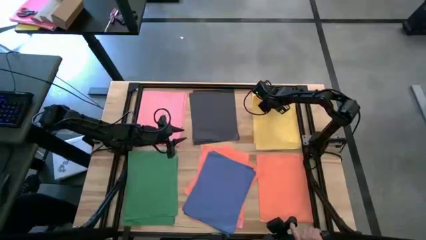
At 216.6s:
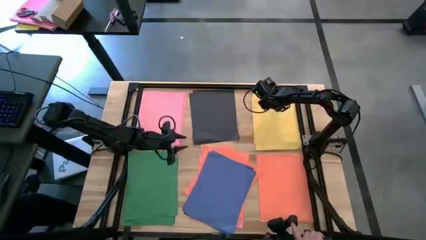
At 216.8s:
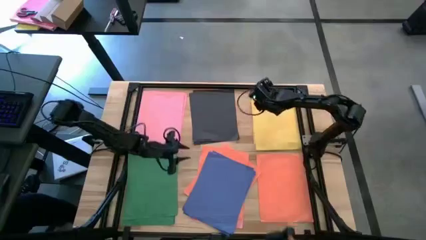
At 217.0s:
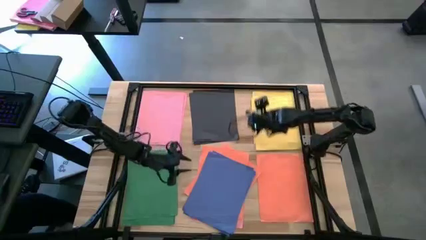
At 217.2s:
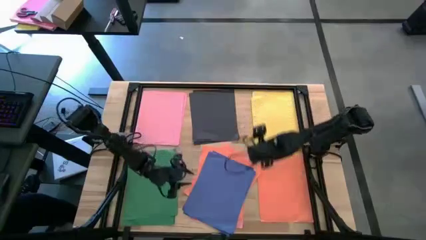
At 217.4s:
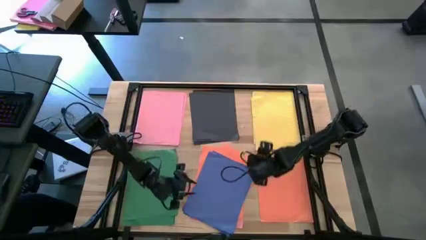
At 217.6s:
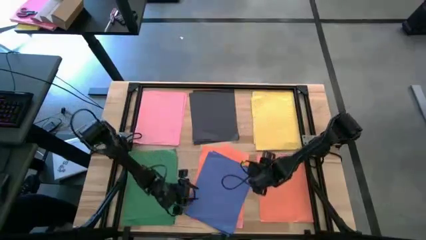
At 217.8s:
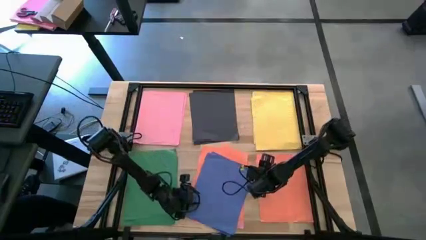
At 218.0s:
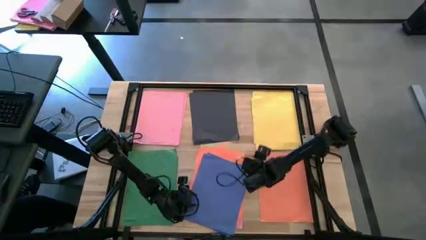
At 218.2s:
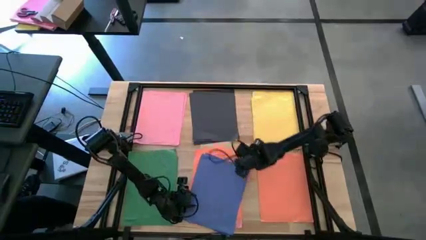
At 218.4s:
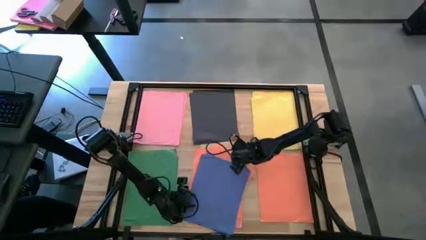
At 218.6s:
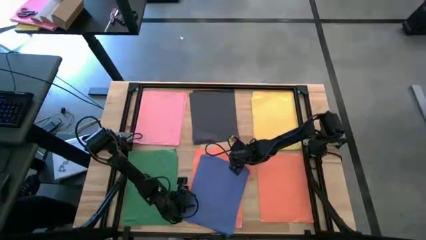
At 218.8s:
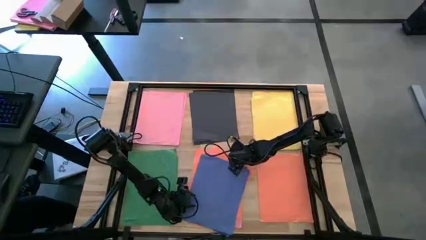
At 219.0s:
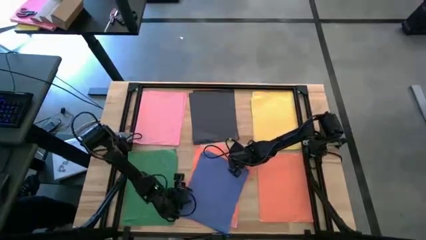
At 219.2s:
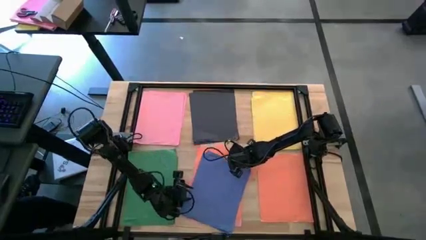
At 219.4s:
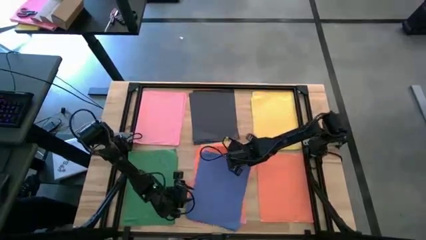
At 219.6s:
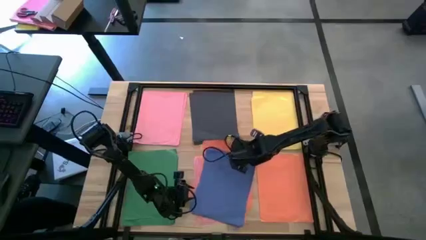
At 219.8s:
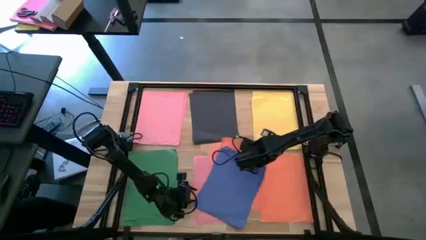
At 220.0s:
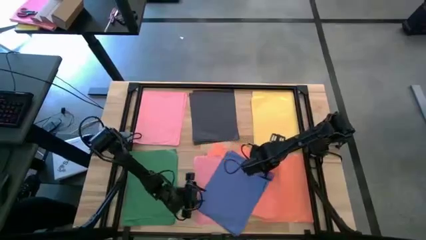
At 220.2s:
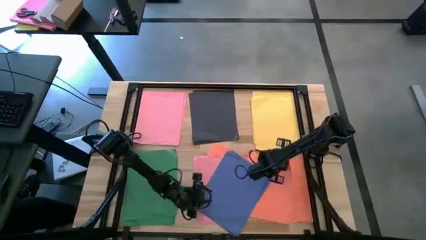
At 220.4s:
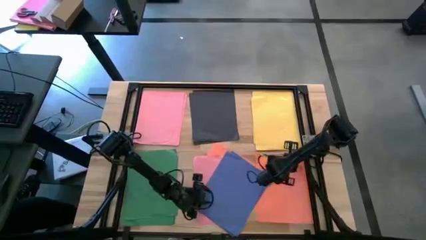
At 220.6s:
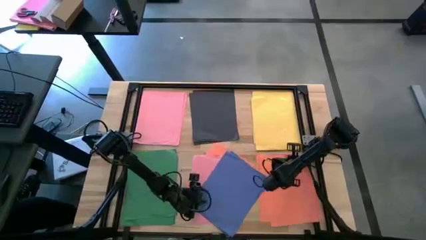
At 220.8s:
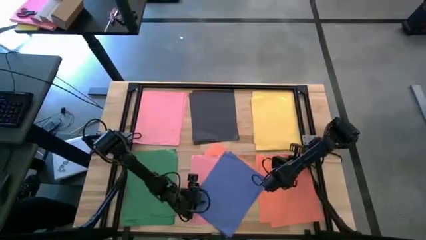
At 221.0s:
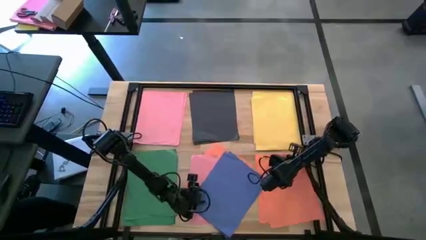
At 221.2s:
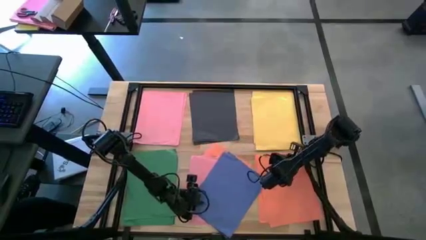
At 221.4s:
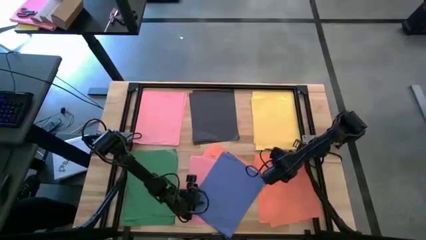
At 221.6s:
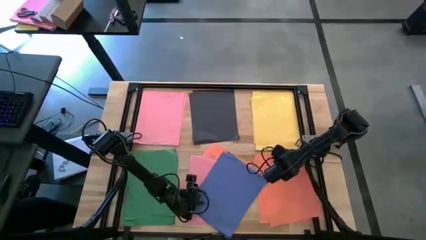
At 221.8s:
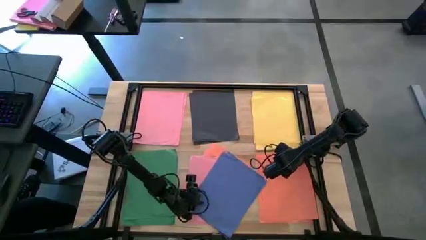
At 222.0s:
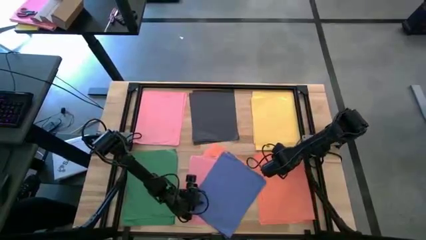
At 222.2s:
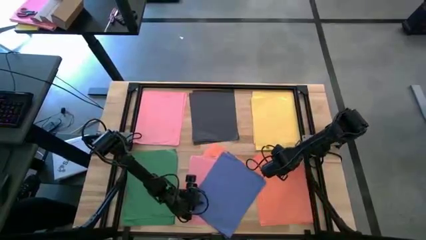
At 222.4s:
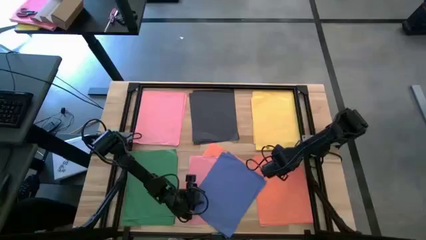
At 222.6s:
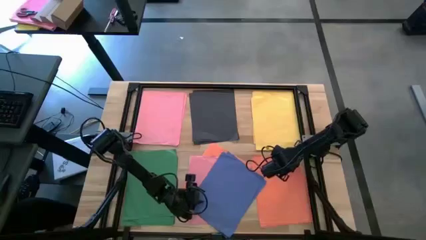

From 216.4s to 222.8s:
Task: Organize paper
Stack the orange color paper on top of the other orange color paper

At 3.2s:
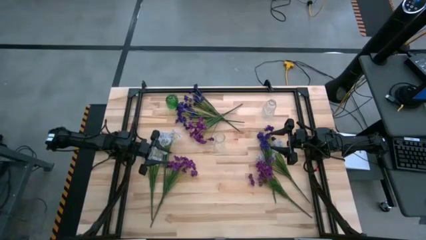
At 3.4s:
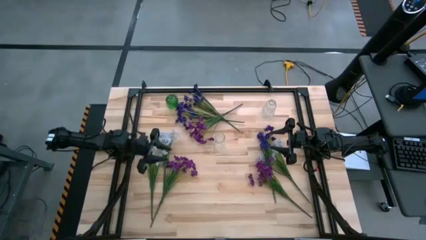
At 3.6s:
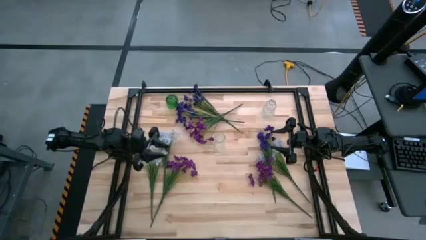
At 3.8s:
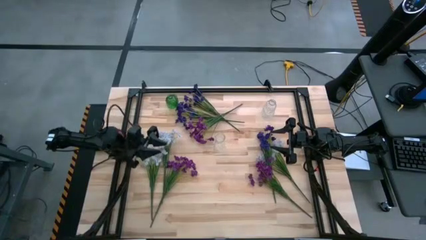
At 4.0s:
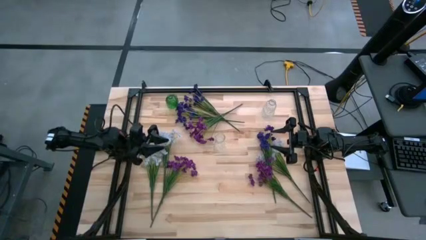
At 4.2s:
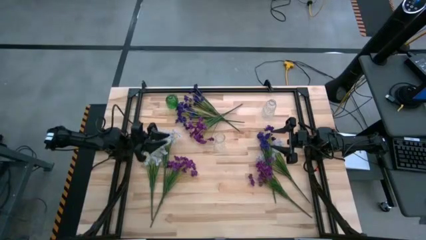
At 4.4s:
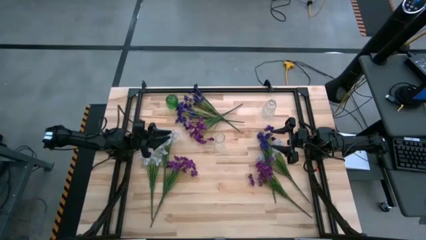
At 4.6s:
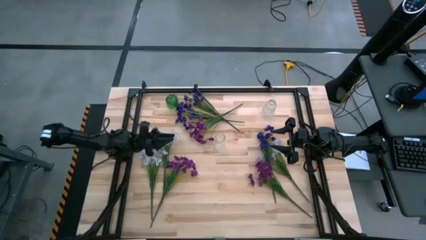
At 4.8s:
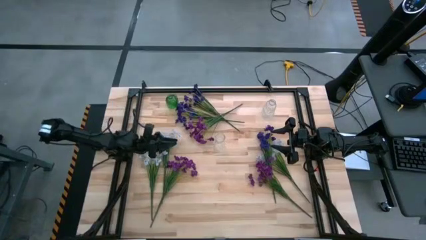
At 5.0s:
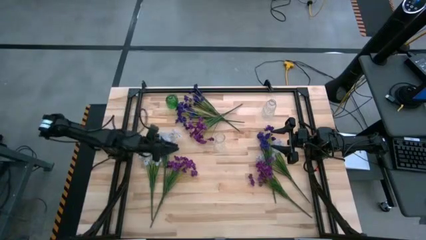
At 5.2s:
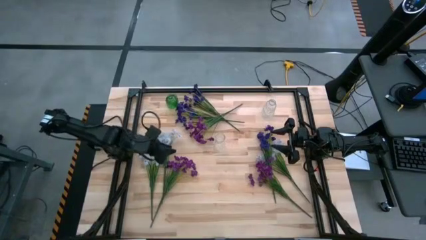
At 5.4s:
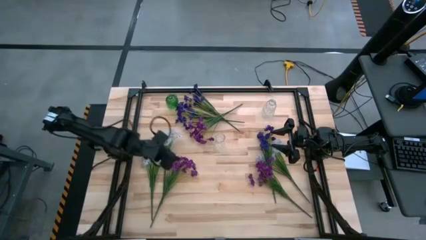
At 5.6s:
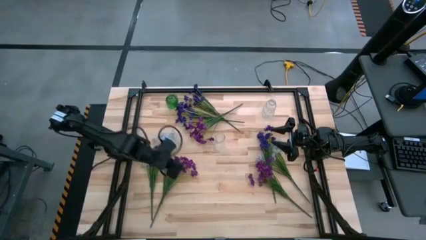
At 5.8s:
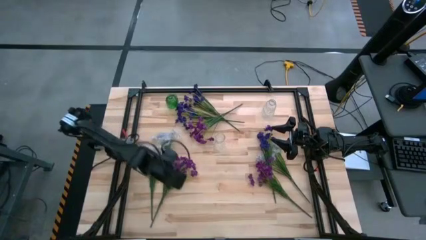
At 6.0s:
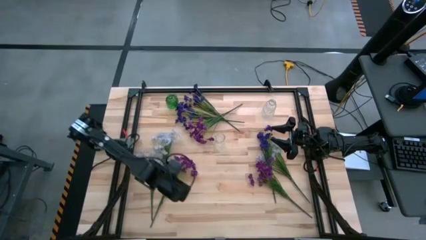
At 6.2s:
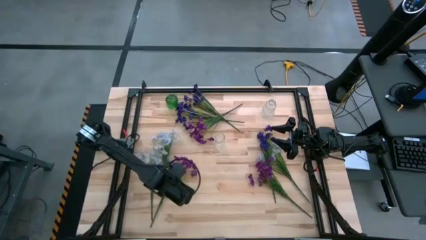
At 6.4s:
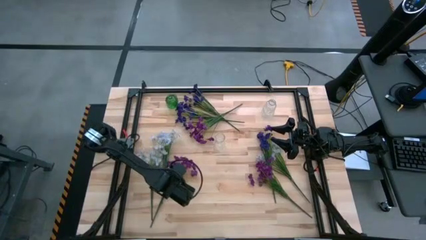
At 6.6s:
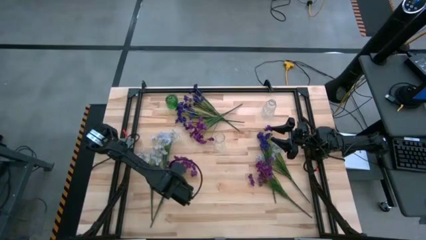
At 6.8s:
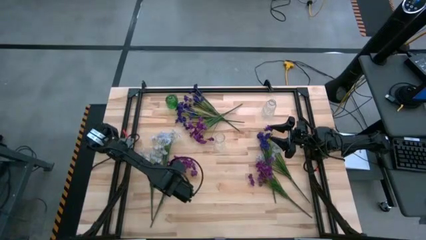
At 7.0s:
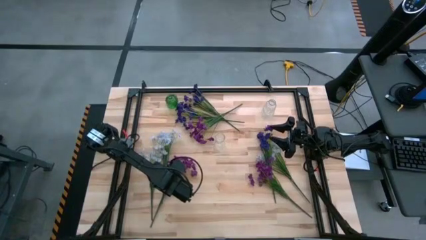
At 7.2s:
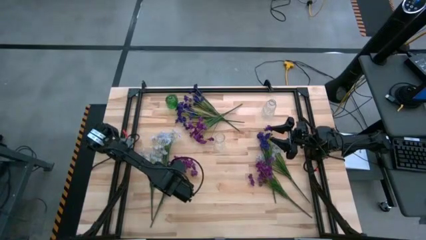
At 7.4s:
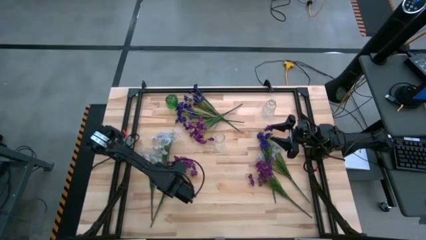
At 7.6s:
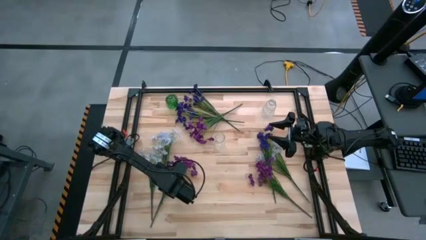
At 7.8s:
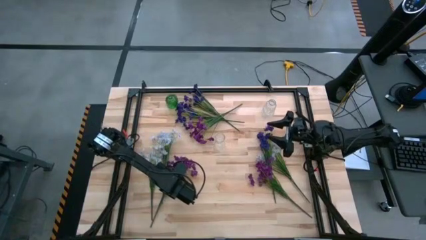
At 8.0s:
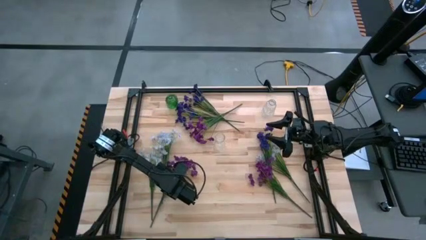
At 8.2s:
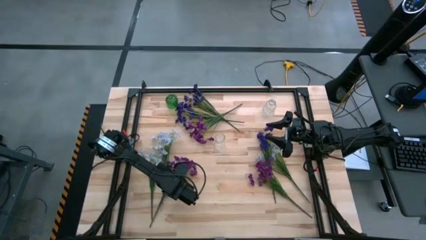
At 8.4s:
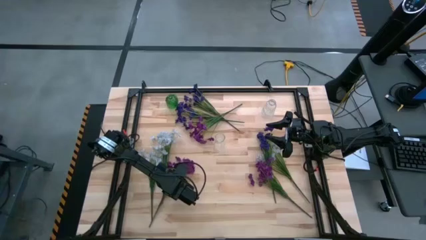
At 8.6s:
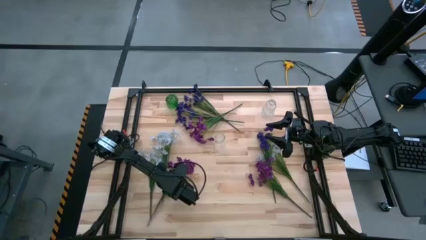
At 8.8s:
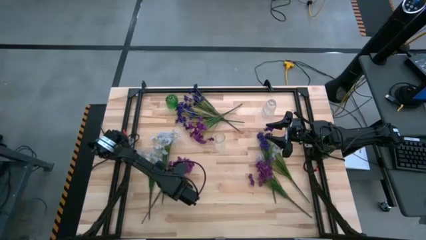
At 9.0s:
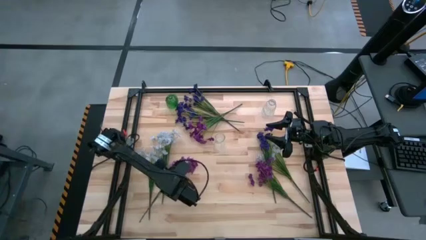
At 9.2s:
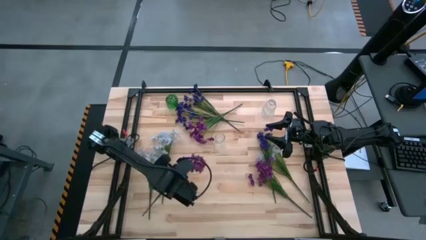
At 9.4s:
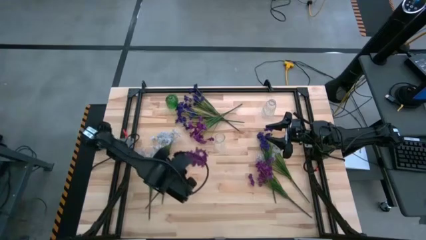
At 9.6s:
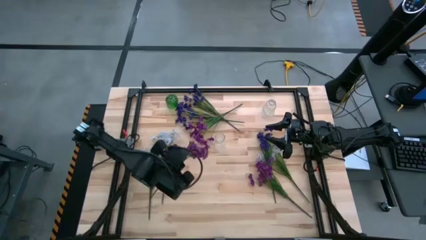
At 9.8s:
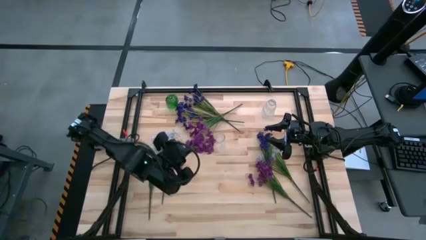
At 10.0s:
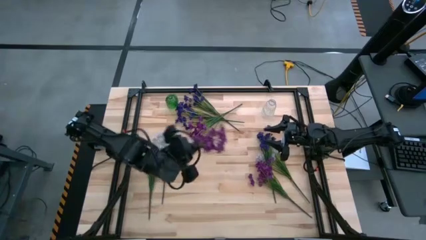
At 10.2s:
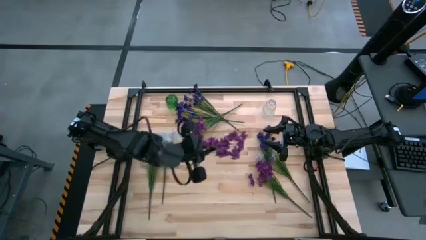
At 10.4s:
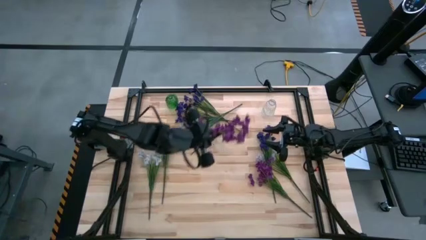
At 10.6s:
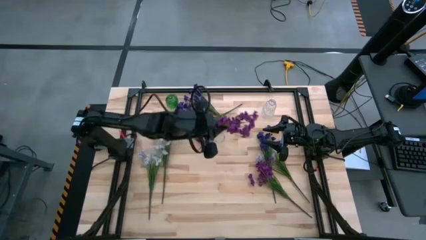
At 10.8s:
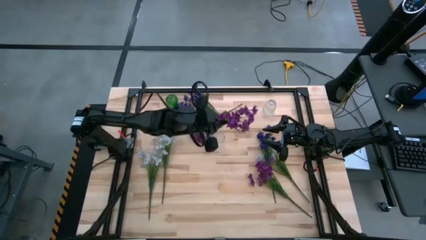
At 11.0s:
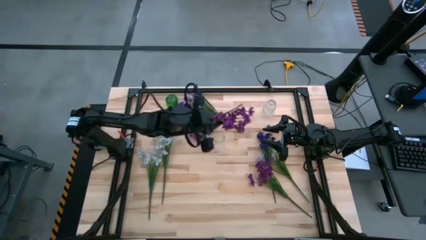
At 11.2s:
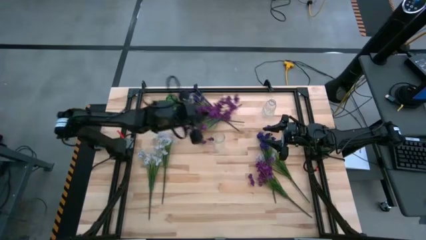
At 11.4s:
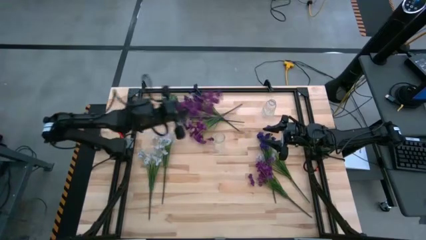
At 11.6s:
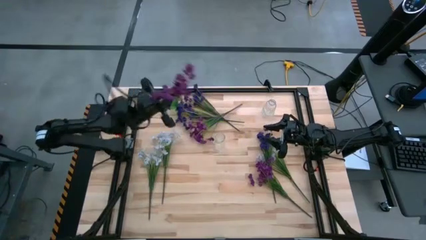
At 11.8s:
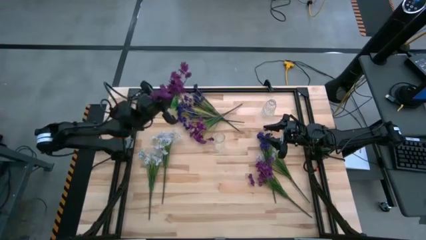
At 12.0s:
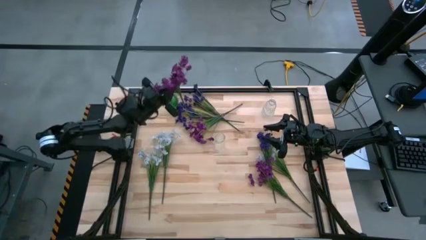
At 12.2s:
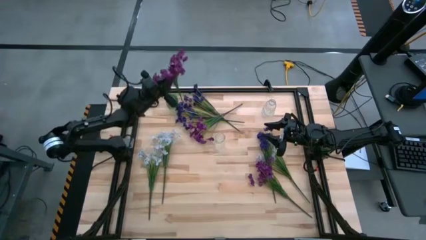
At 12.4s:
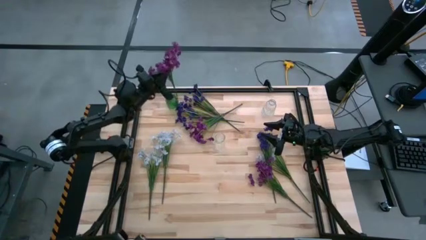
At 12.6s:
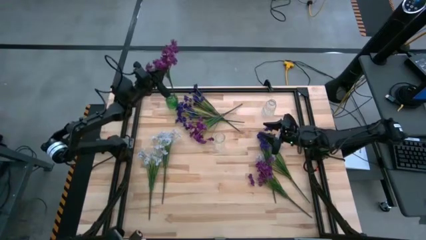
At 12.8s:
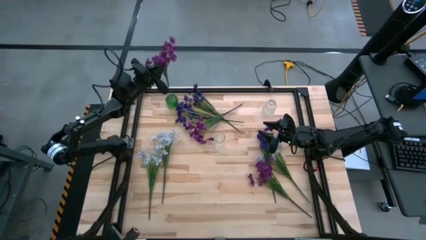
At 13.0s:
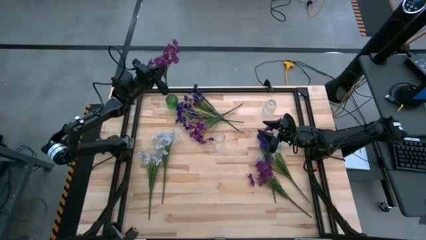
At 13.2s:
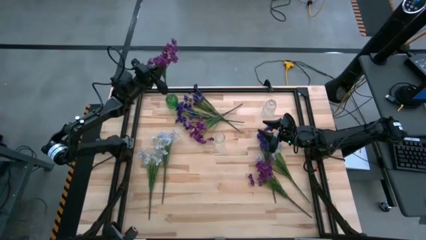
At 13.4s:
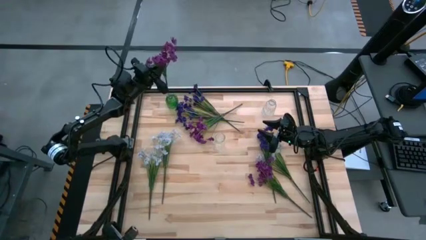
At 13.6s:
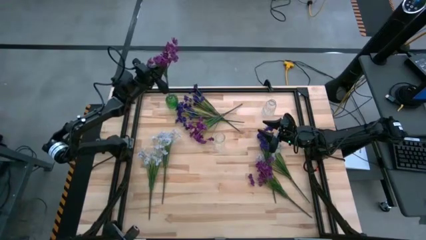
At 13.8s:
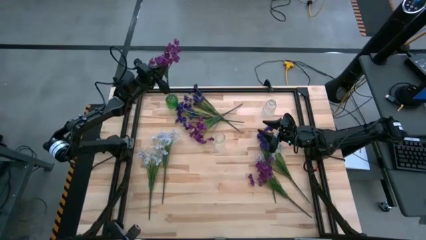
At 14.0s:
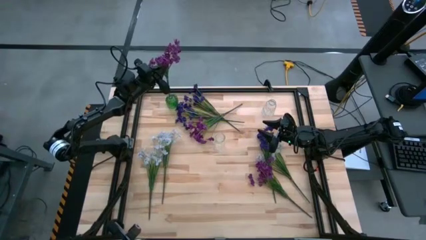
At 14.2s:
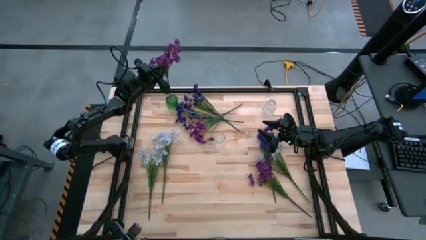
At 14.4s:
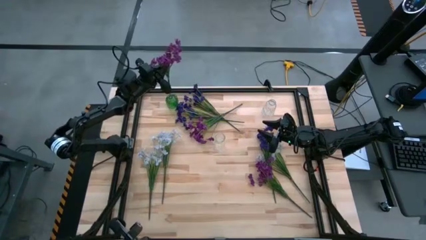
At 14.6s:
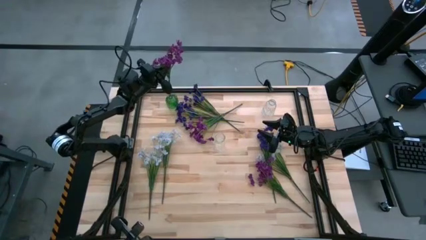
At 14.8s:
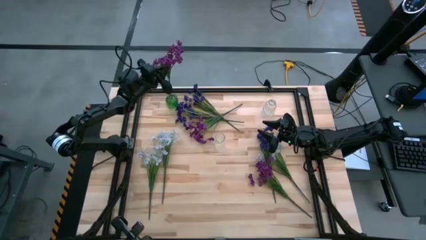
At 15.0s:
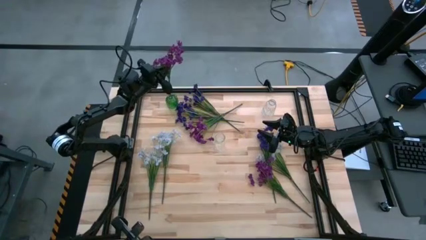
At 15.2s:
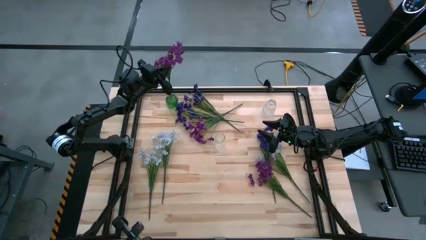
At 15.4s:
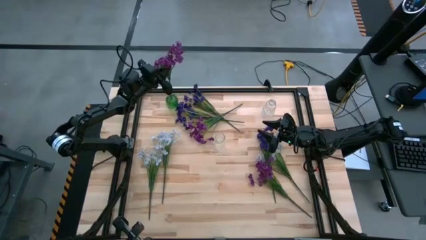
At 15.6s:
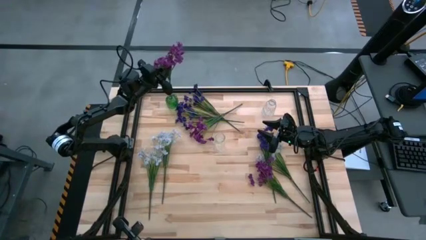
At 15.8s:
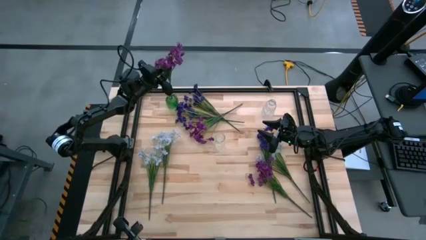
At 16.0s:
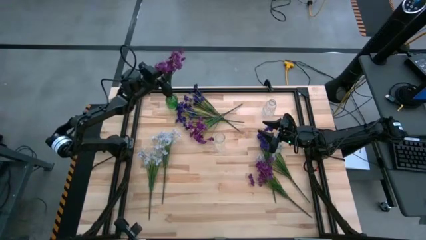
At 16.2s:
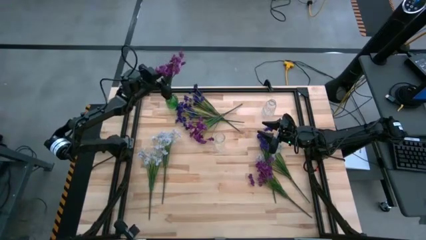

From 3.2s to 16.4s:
Task: Sort flowers into vase by color
Put the bottom left violet flowers into the green flower vase
